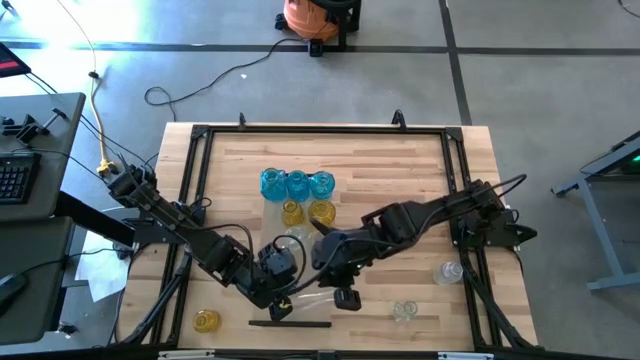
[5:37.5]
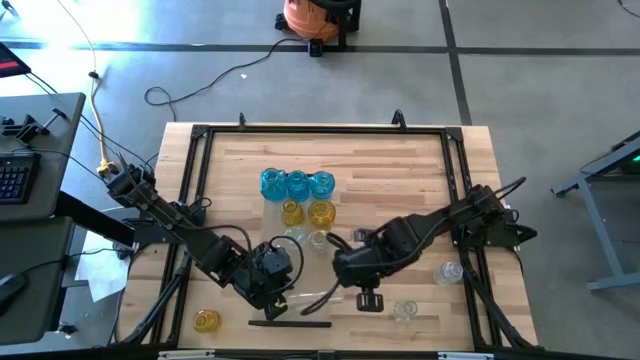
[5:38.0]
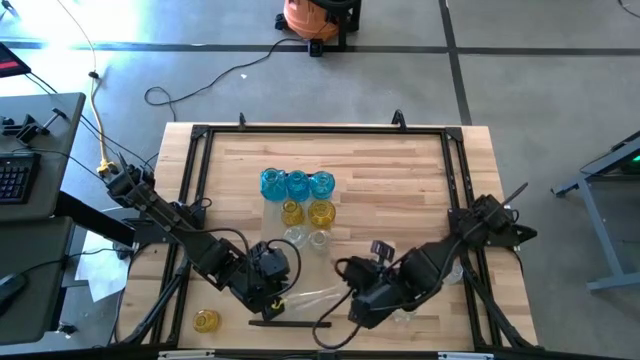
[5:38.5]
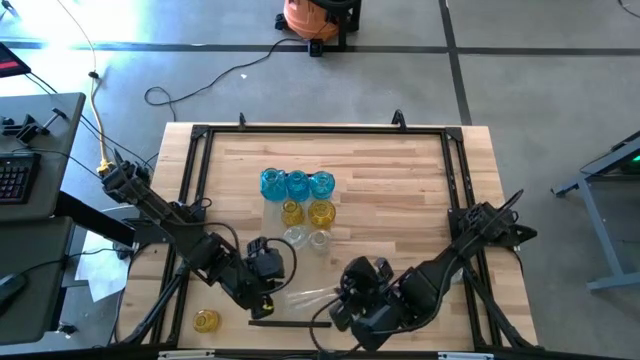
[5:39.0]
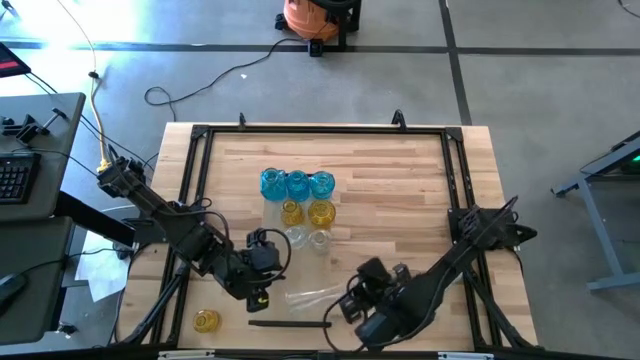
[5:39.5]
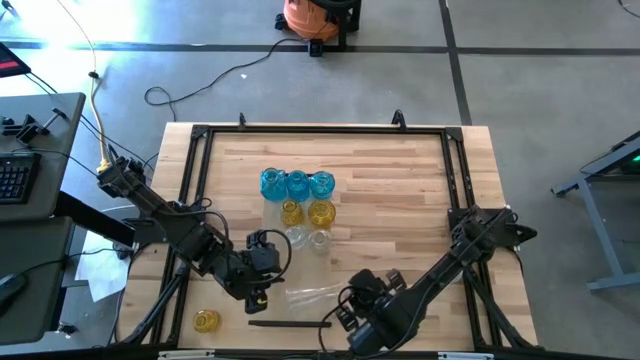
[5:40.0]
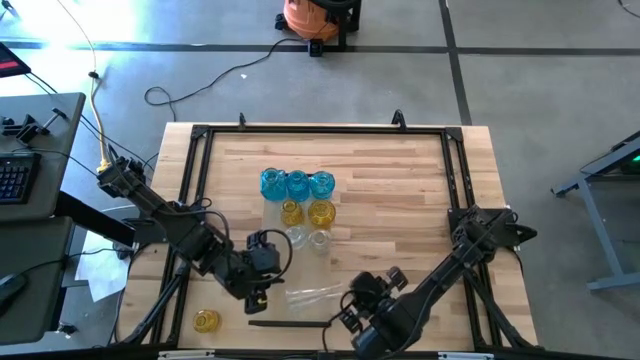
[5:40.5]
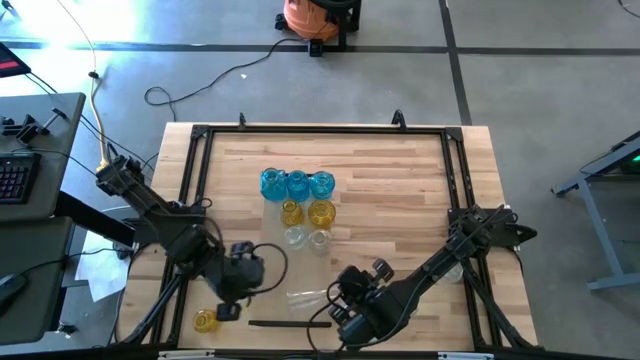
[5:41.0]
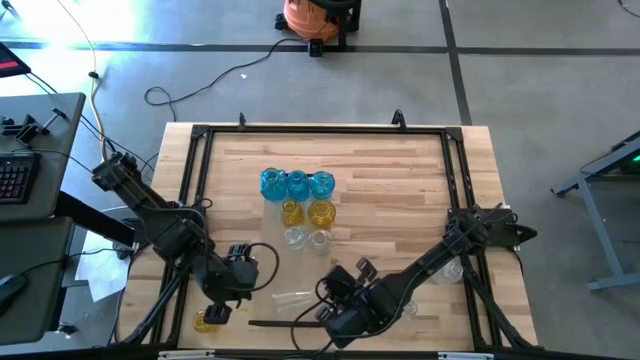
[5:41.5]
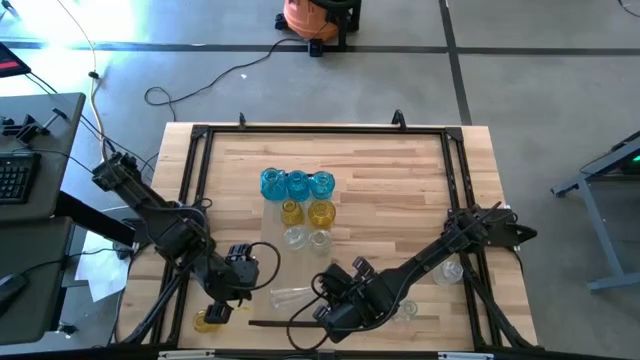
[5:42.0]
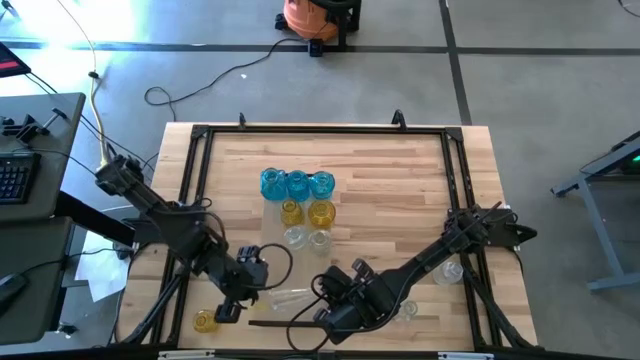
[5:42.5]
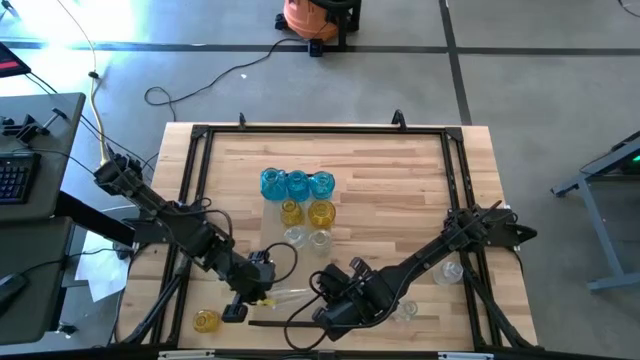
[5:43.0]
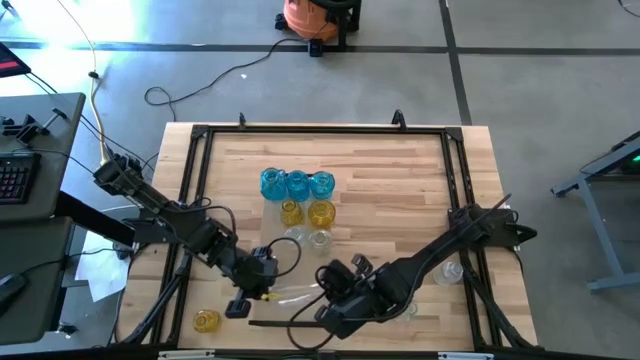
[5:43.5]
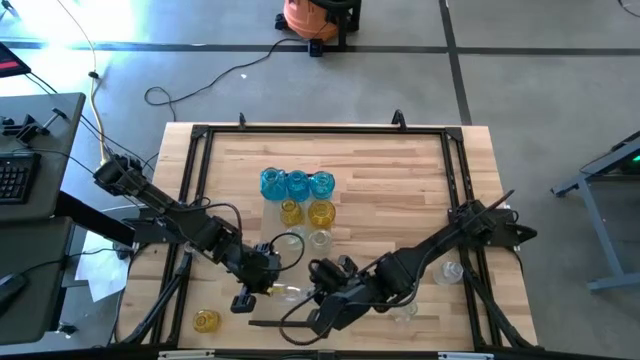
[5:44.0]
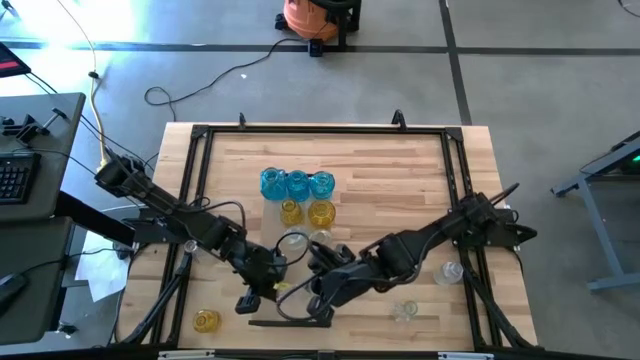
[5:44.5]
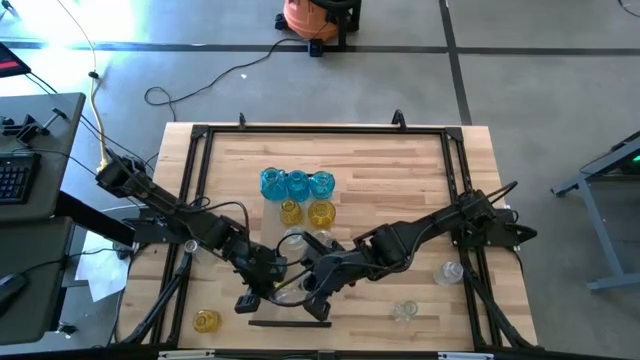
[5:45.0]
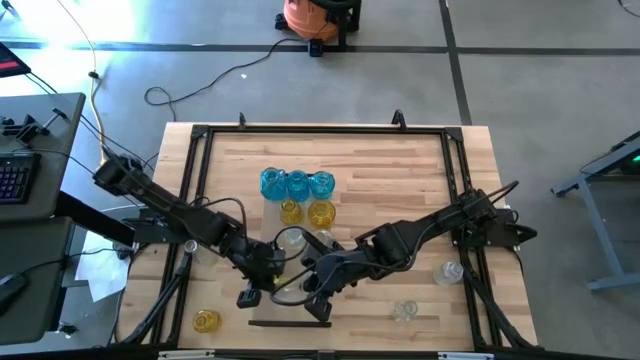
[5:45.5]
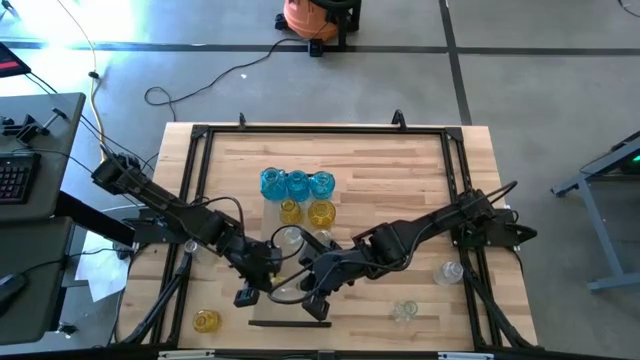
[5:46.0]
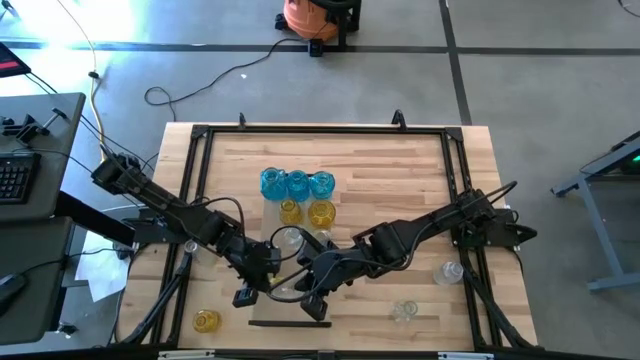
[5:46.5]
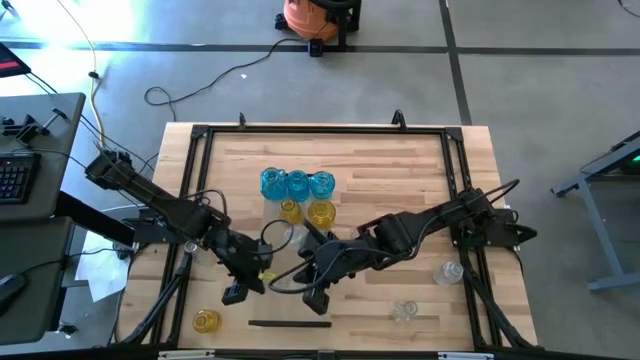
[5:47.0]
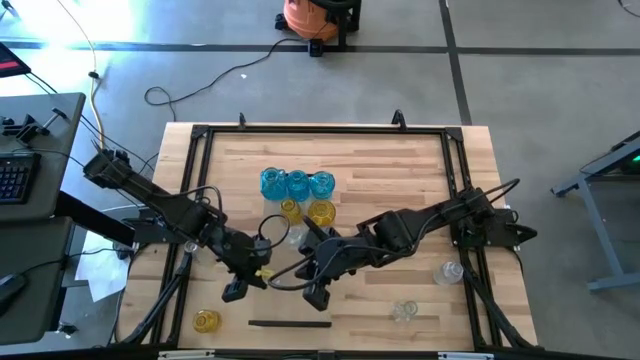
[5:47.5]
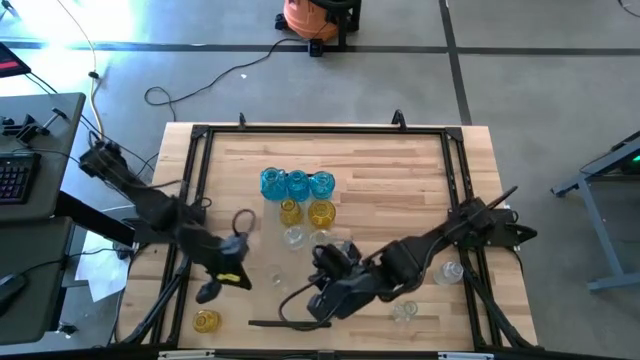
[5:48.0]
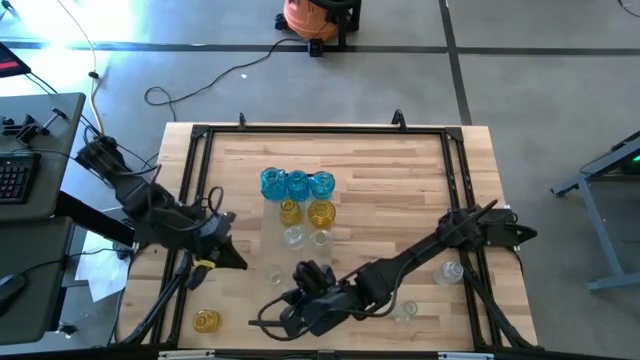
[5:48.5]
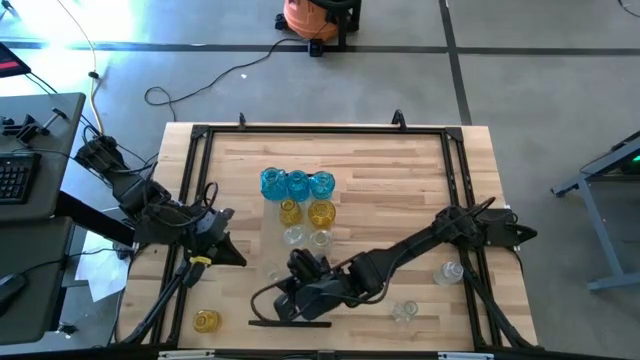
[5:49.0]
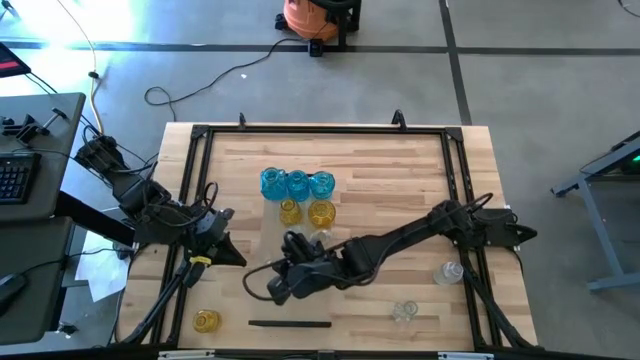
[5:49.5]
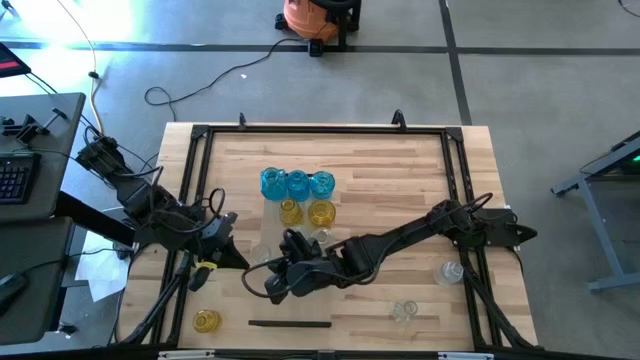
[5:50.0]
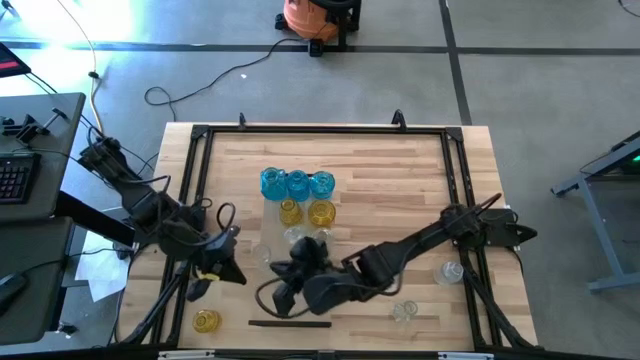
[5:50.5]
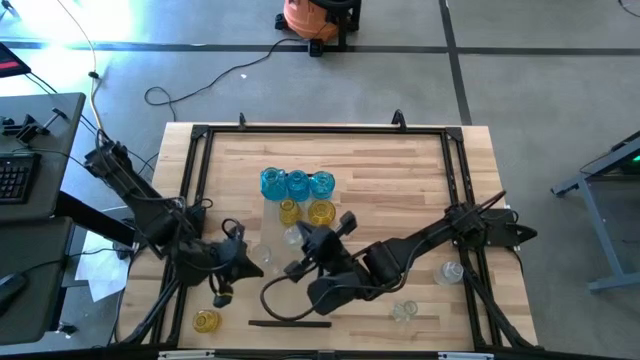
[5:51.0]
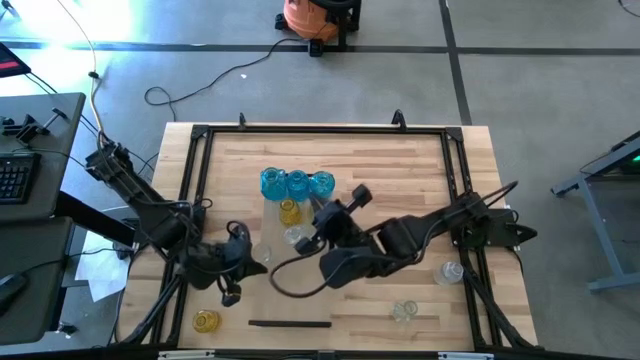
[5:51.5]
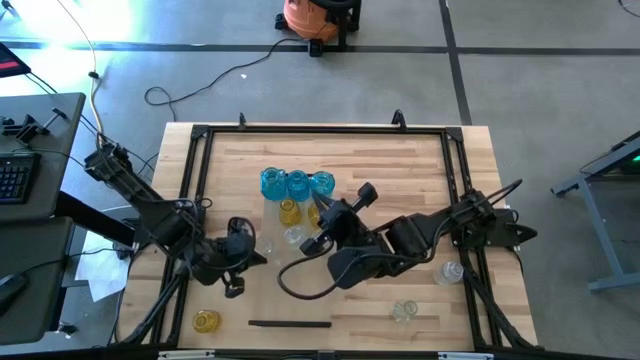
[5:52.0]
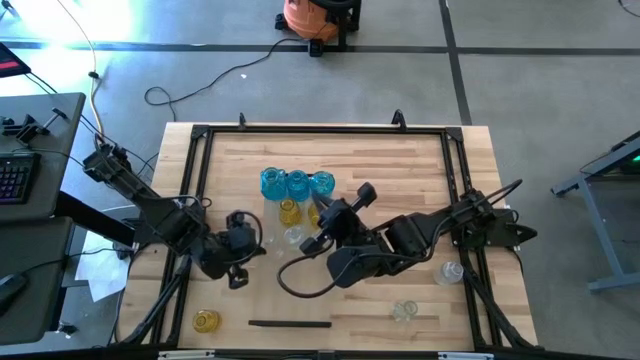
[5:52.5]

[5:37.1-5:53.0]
Task: sort vases onto shelf
Put the top transparent vase on the shelf to align with the other transparent vases

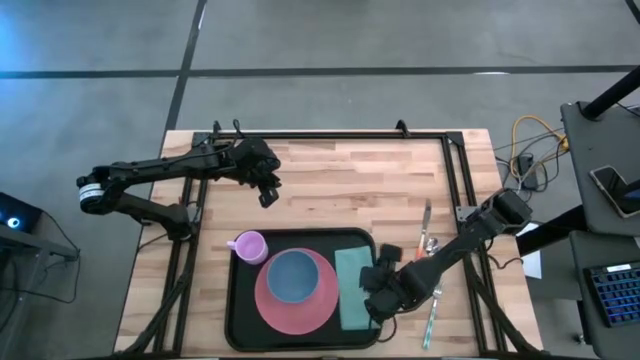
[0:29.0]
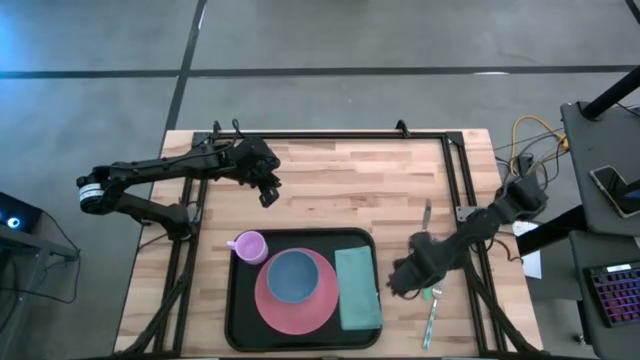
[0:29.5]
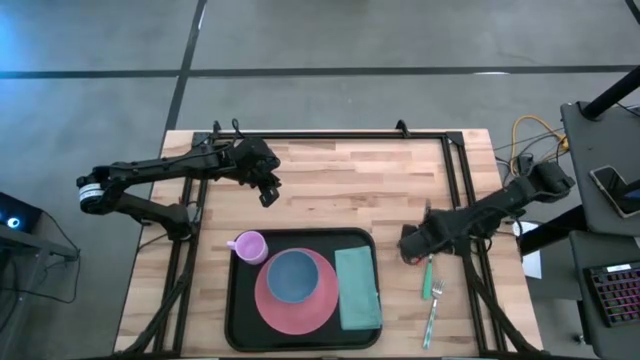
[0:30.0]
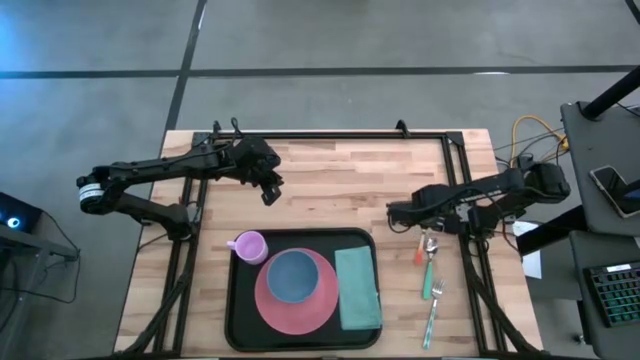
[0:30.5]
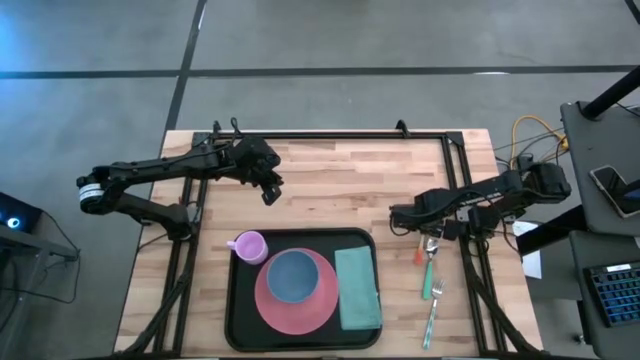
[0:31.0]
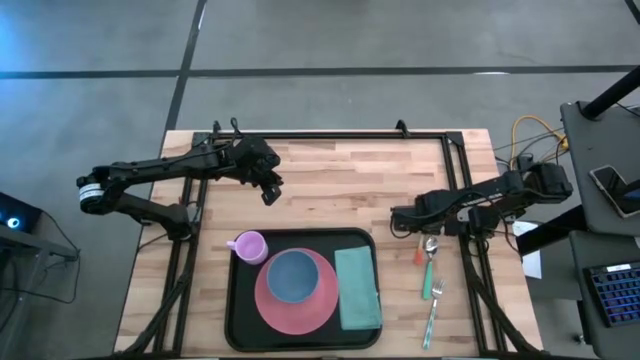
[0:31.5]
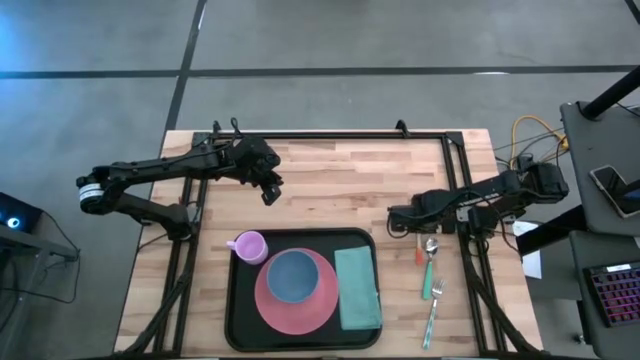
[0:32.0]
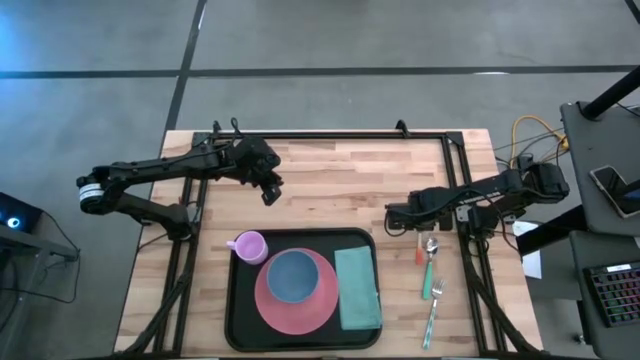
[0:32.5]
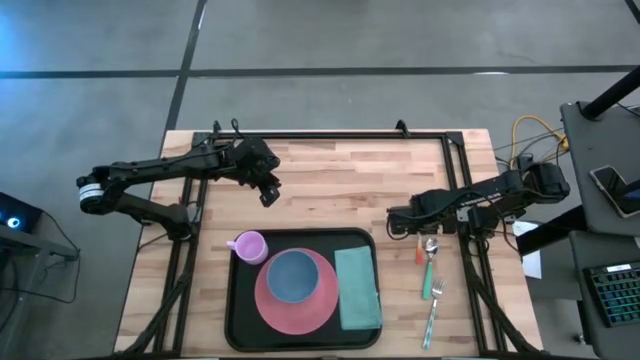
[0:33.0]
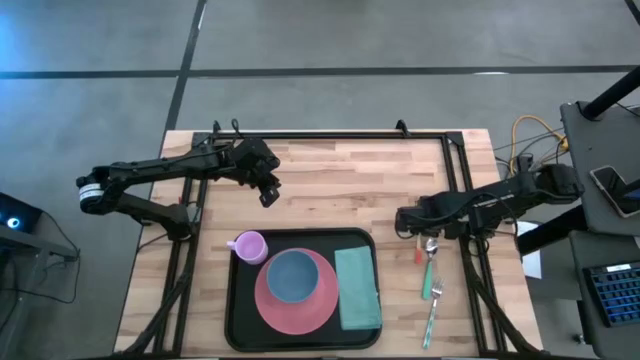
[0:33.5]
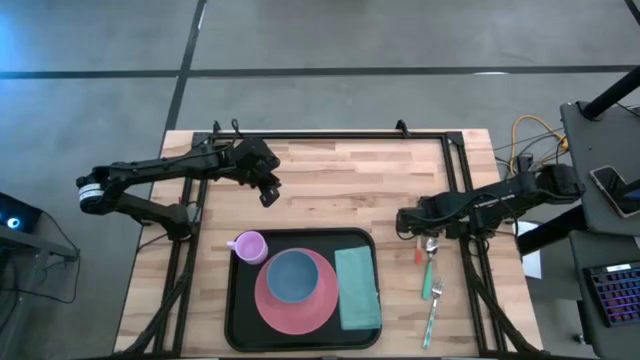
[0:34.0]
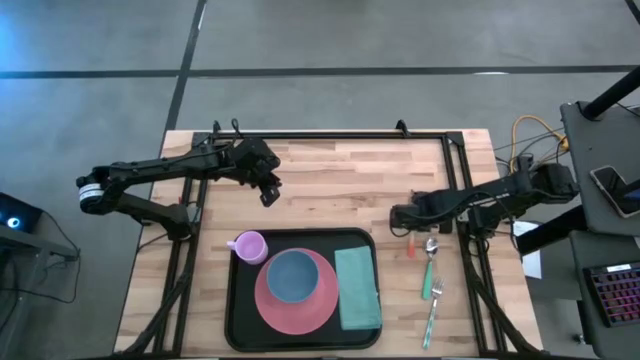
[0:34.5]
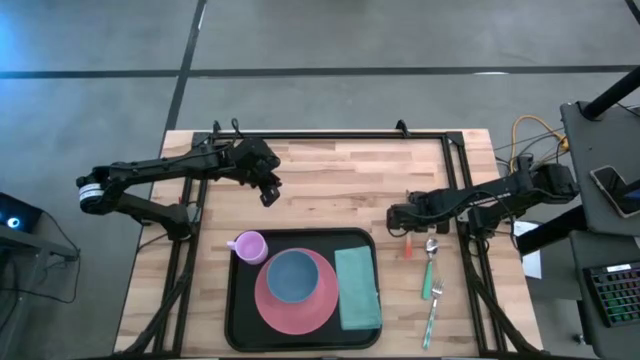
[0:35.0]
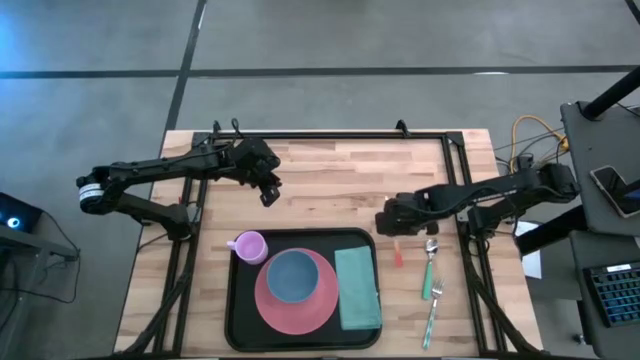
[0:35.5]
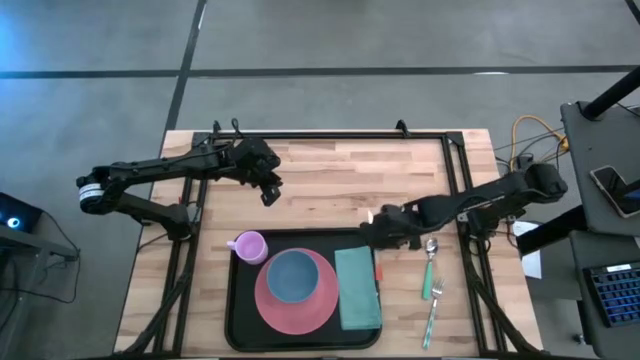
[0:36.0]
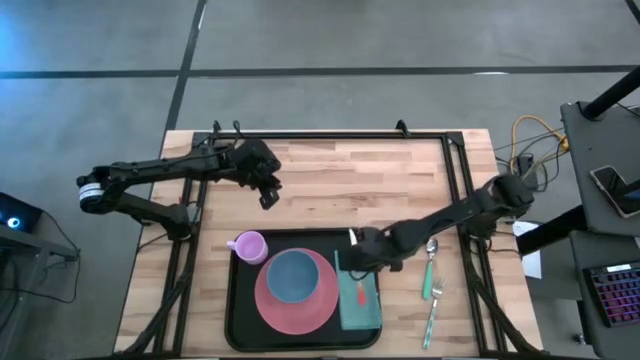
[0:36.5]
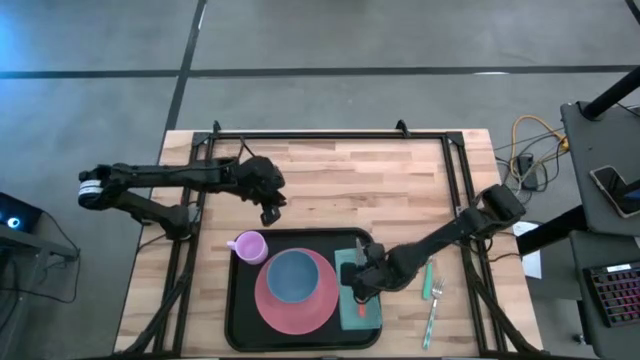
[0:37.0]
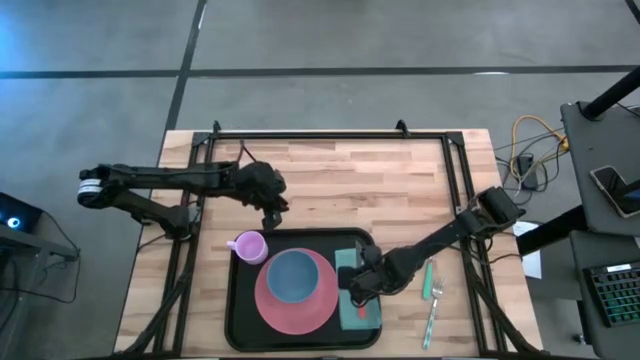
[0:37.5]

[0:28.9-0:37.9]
Task: Set up tray
Put the orange knife on the black serving tray
